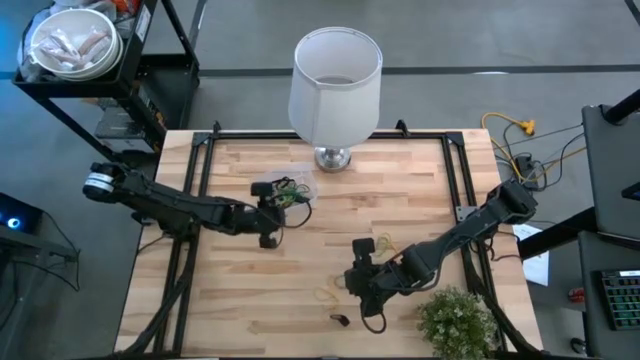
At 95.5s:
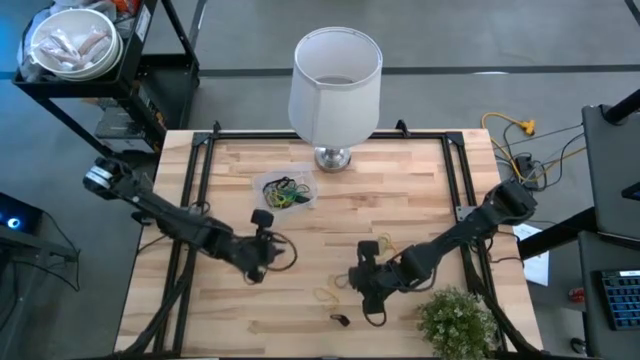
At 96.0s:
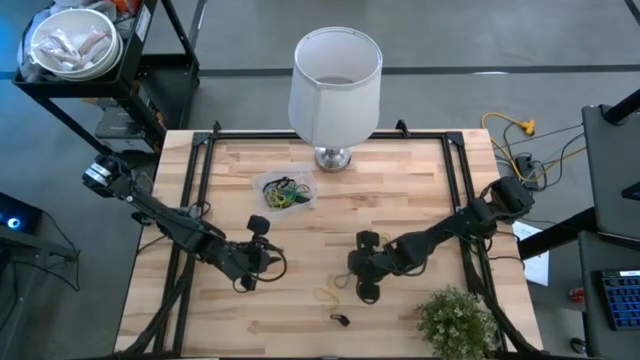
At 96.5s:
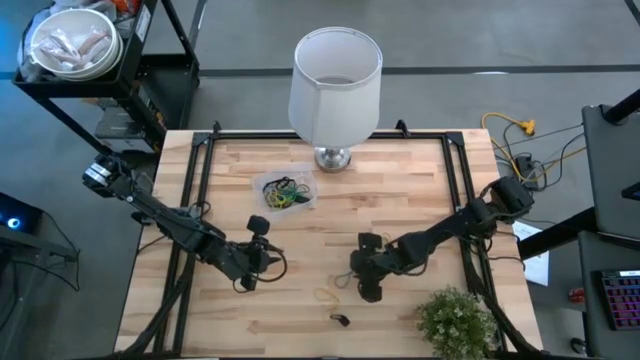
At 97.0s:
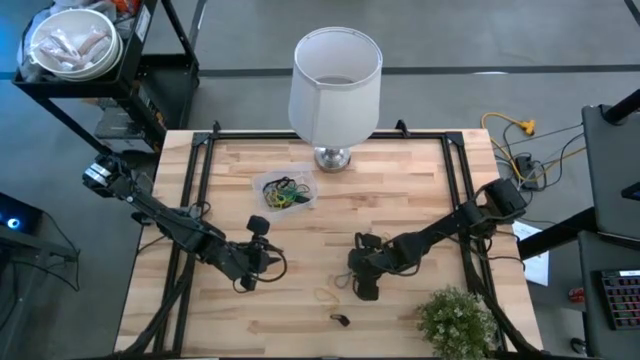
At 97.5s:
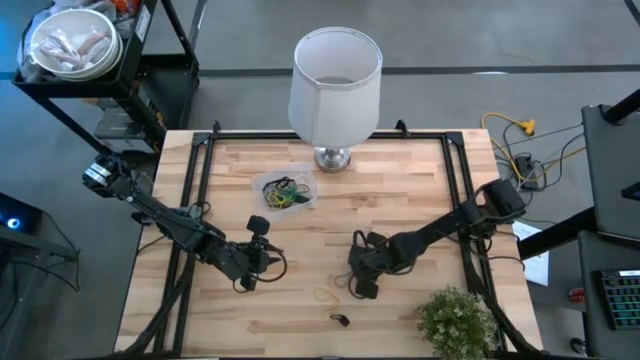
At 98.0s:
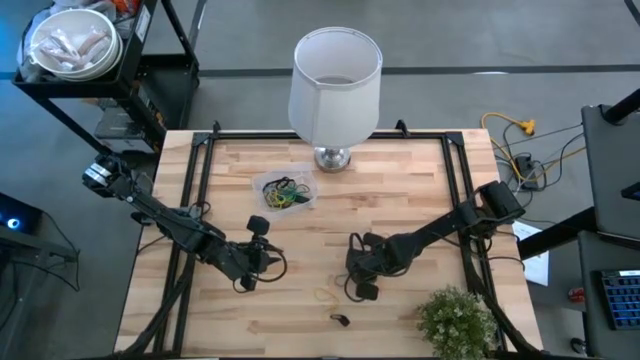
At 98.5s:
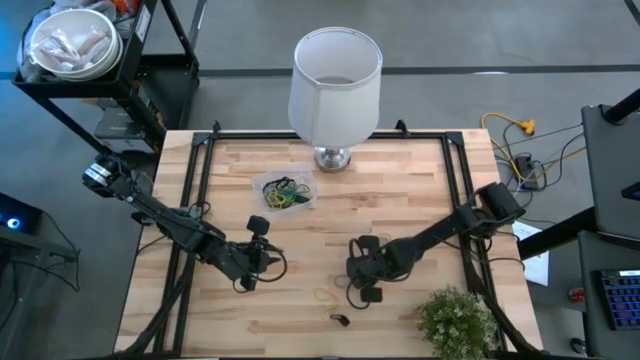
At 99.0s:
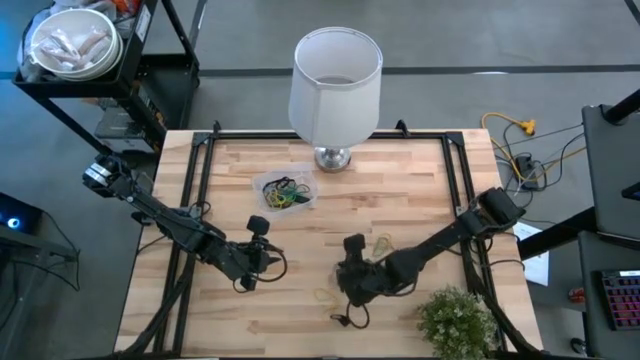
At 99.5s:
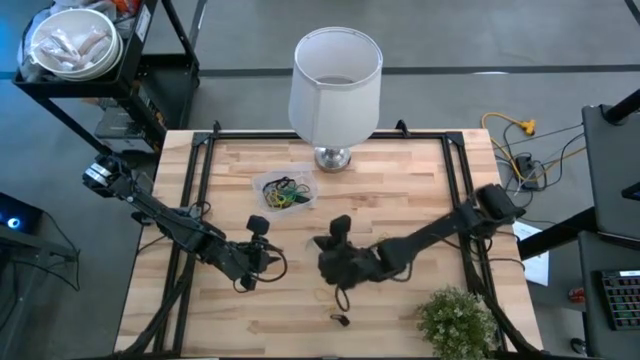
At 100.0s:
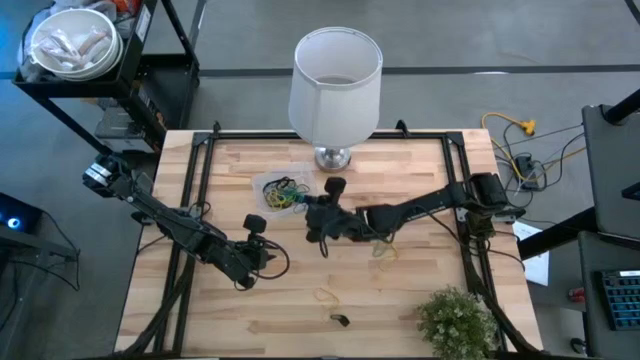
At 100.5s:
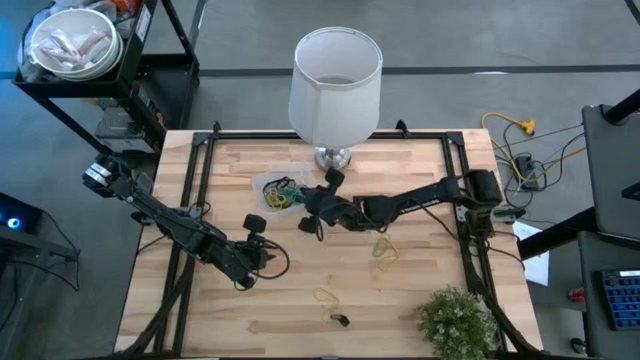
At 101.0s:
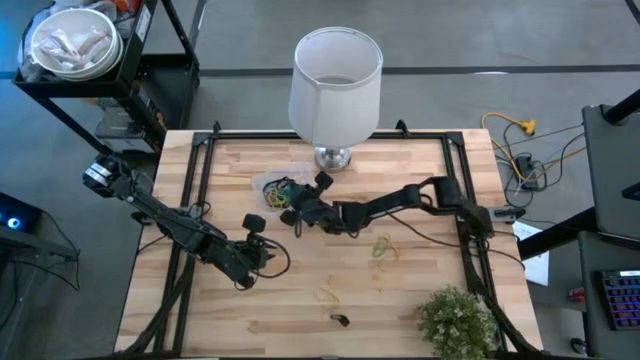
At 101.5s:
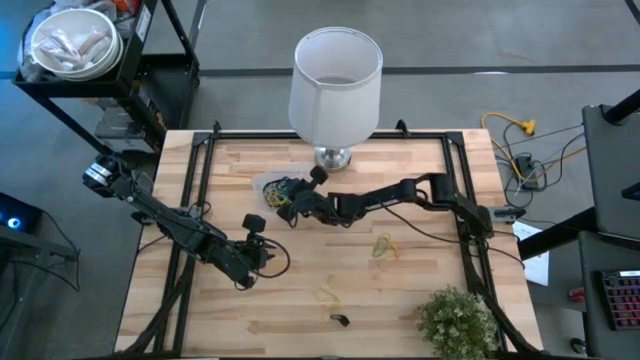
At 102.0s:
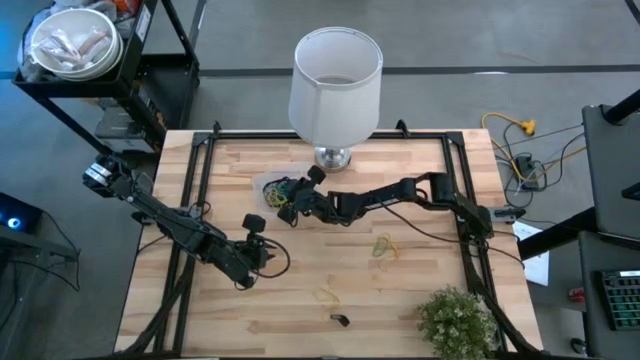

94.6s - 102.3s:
Task: Pick and place rubber bands into bin
Put the blue rubber band into the transparent bin

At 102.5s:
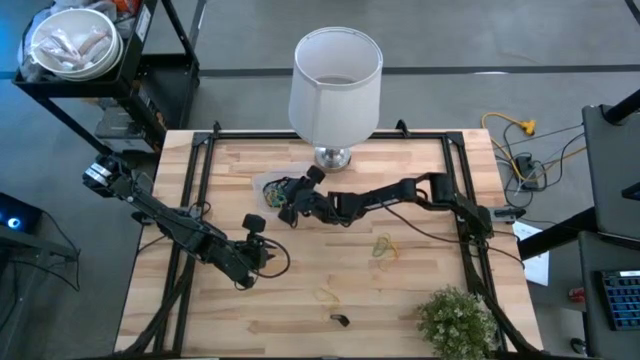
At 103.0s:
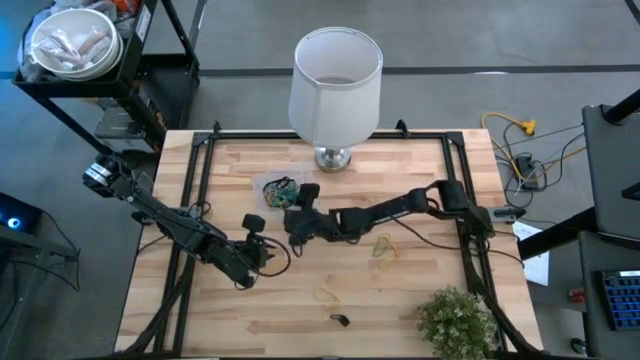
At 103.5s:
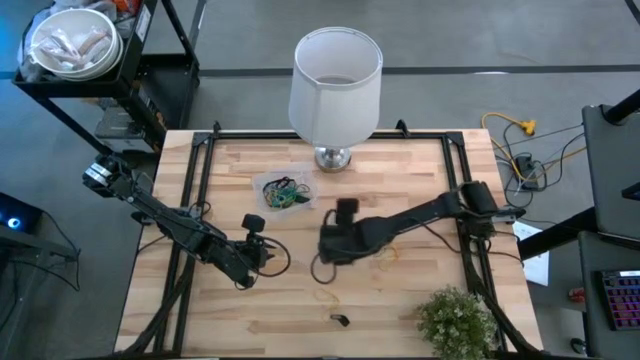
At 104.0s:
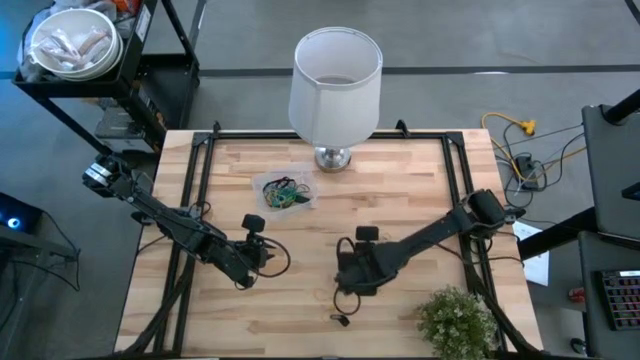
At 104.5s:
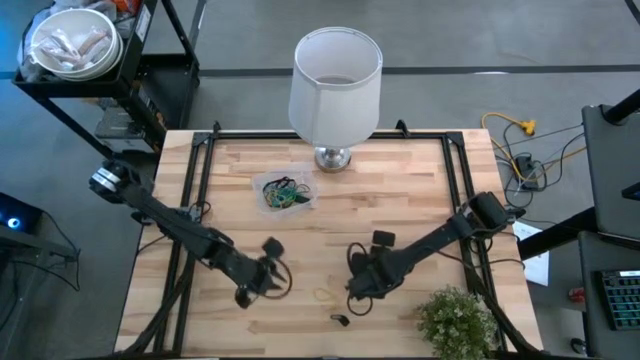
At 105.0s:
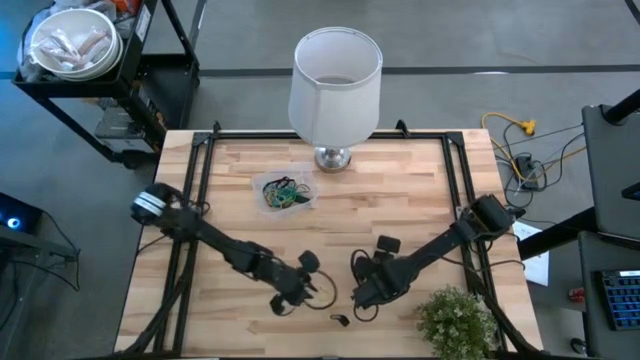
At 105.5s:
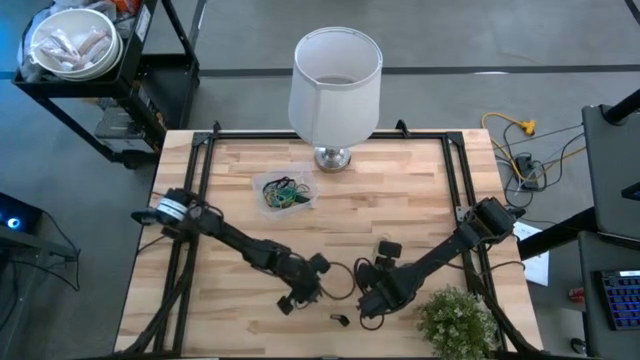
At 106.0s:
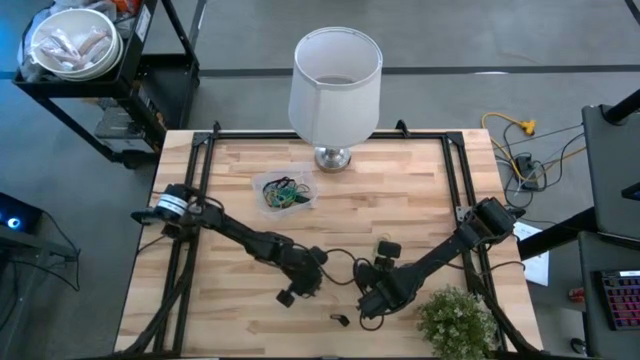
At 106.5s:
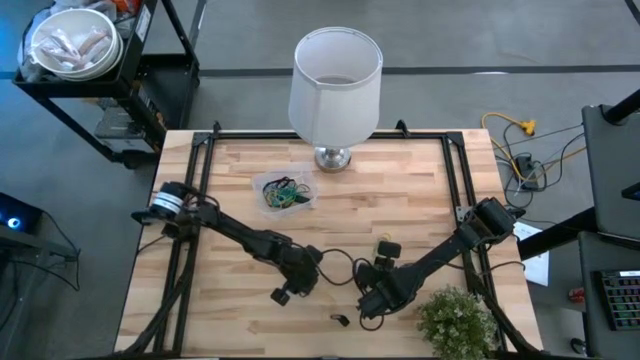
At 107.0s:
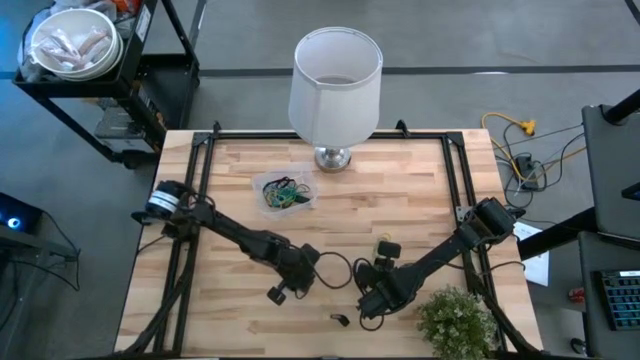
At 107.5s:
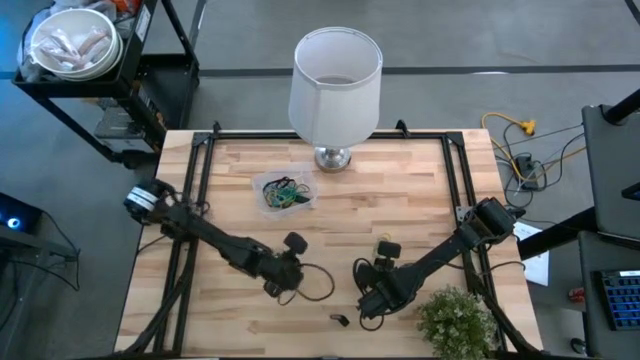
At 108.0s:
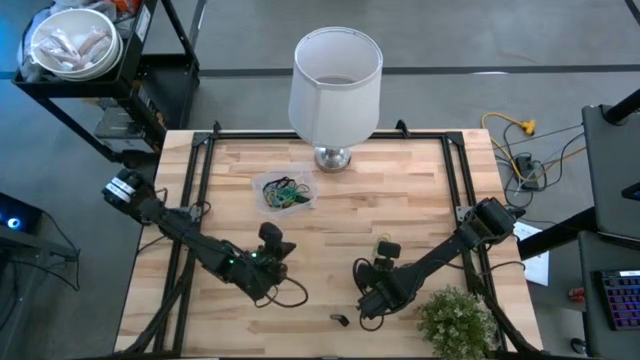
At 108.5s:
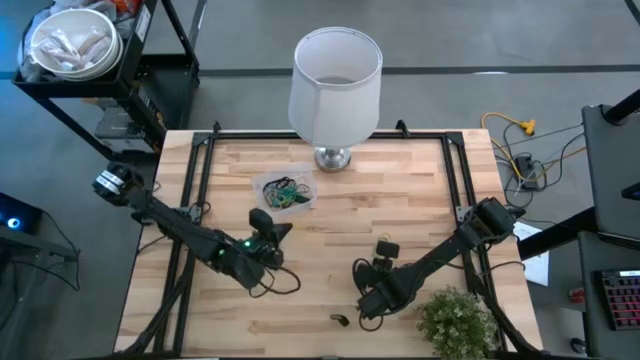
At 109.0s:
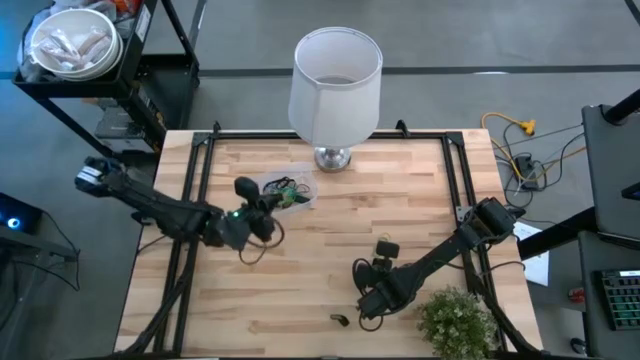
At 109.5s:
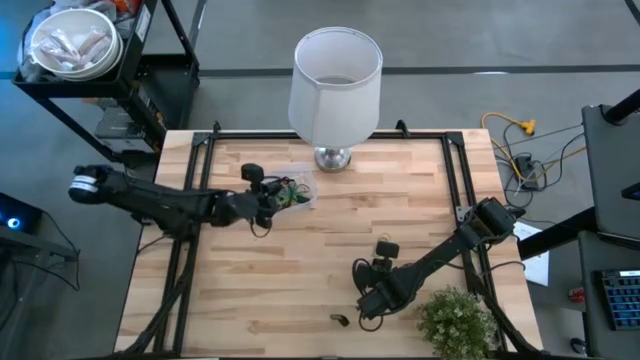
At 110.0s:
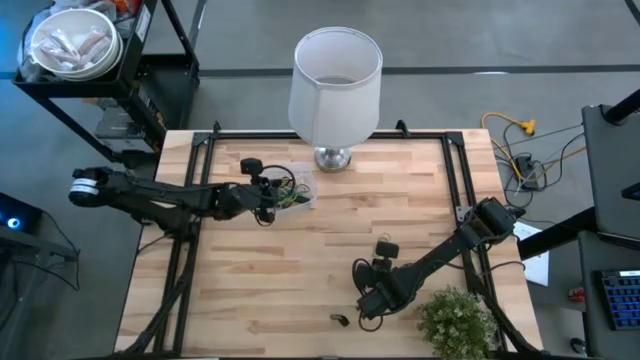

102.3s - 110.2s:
Put the yellow rubber band into the transparent bin

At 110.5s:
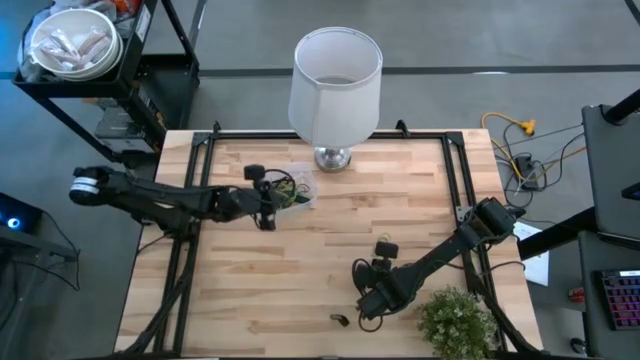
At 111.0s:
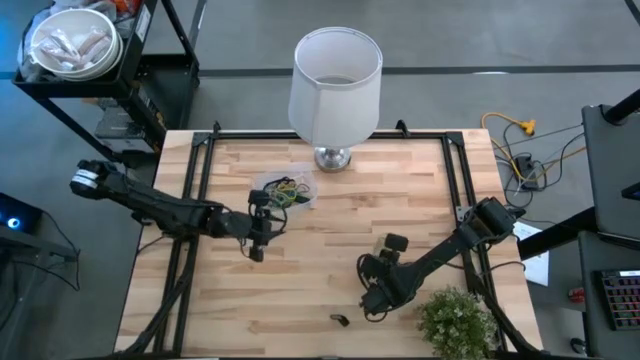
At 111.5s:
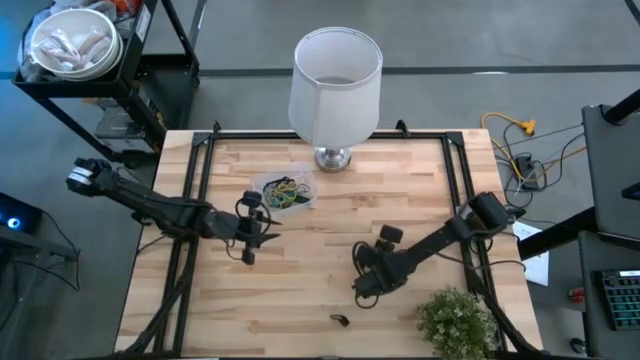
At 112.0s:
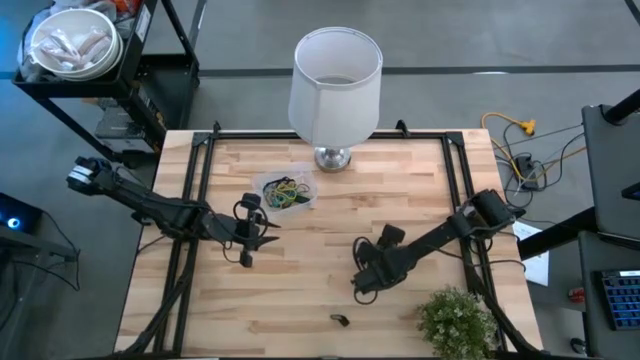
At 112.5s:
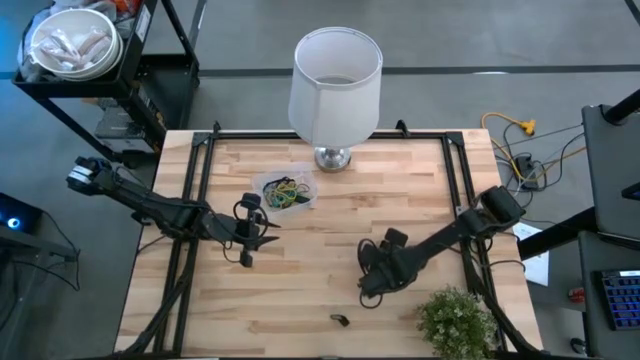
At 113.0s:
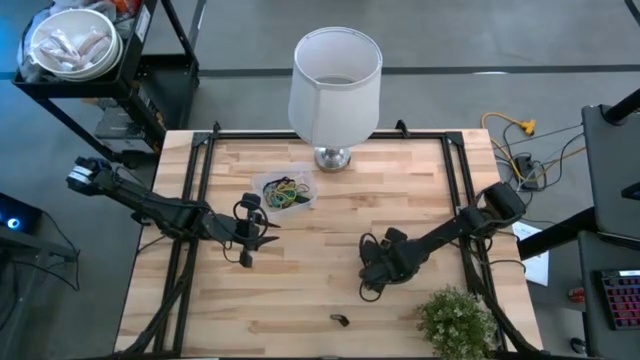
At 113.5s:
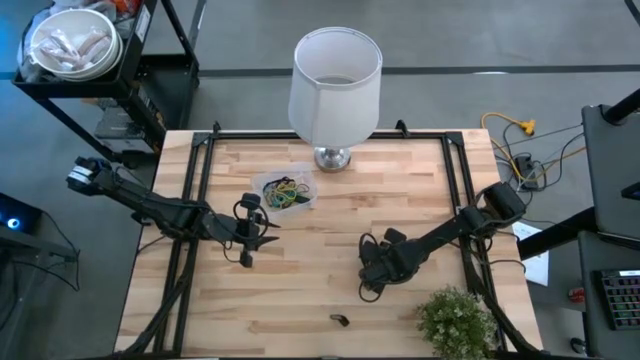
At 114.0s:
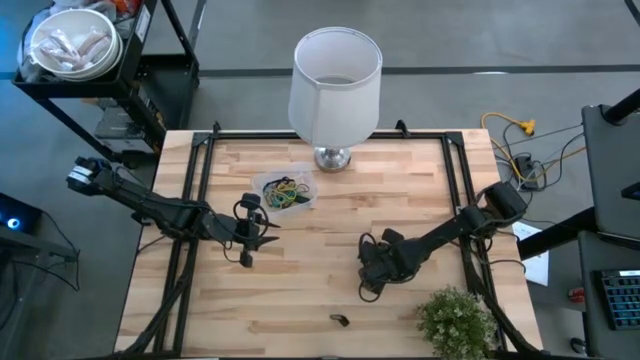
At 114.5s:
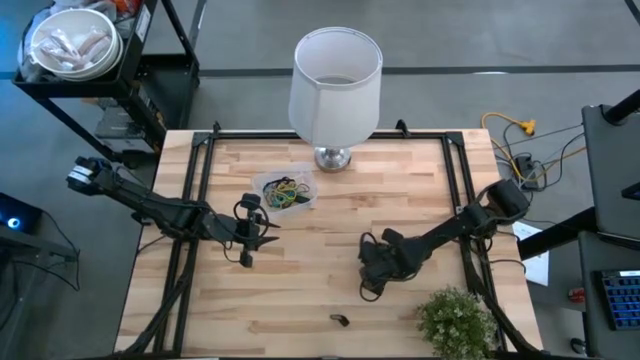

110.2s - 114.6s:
Put the green rubber band into the transparent bin

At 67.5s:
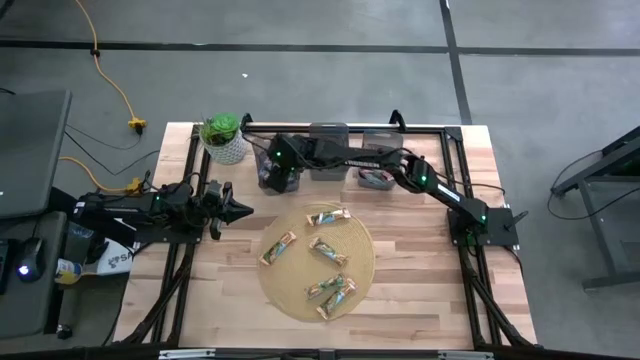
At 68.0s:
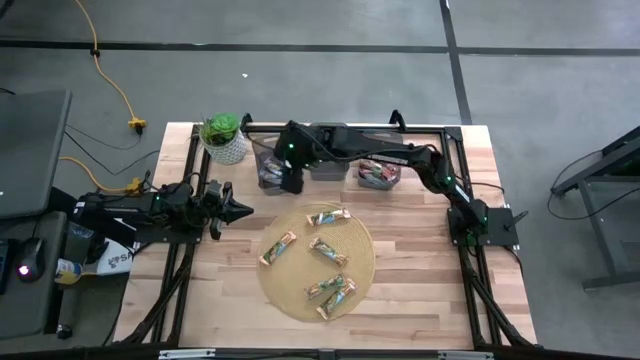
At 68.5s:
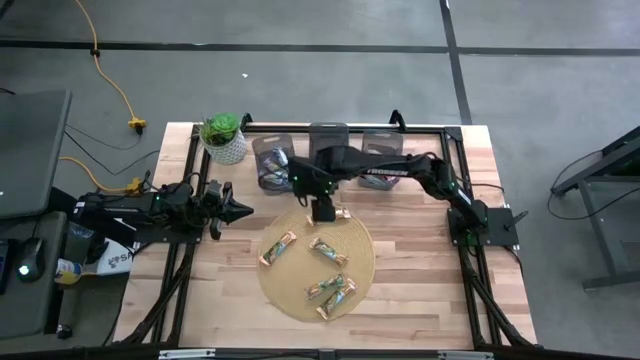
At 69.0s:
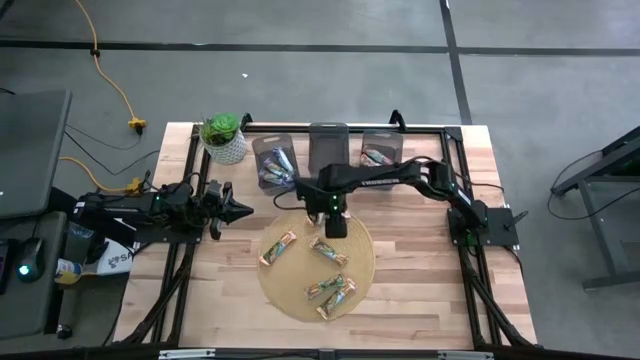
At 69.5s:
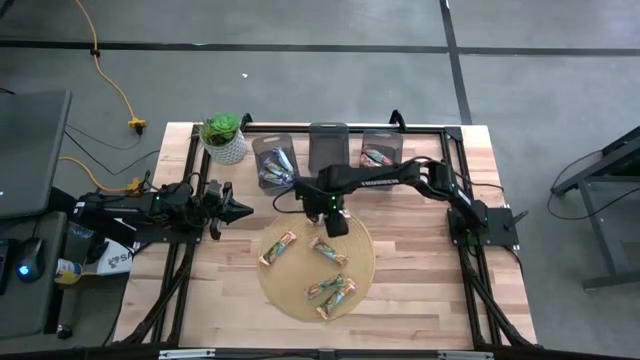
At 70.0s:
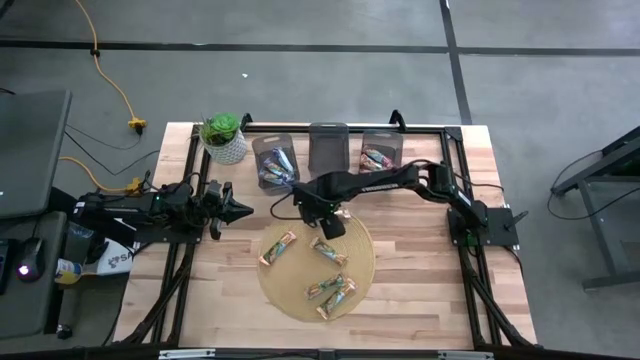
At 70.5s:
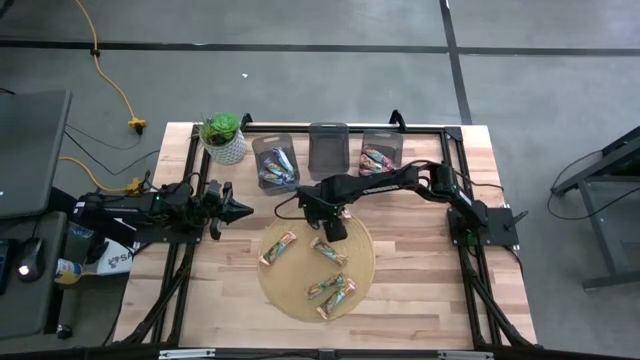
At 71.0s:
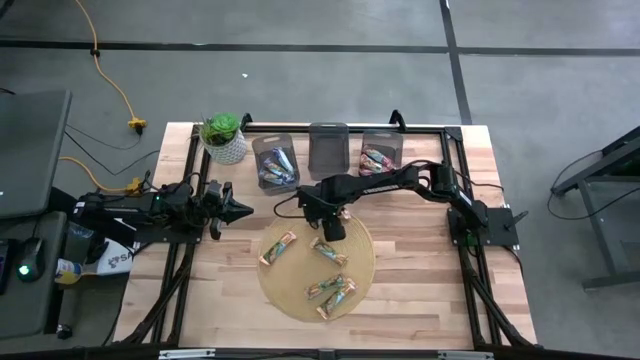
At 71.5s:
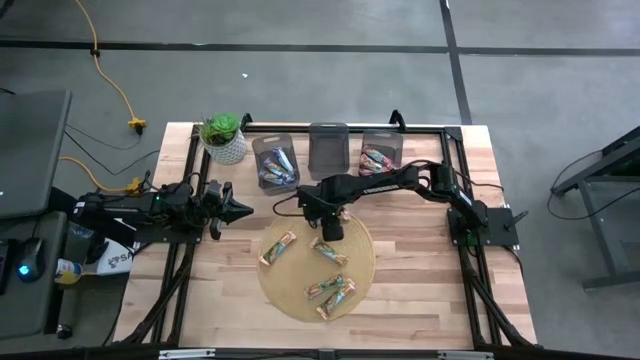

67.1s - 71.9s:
Task: Pick and place Granola Bars by type
Put the yellow granola bar into the center black bin
